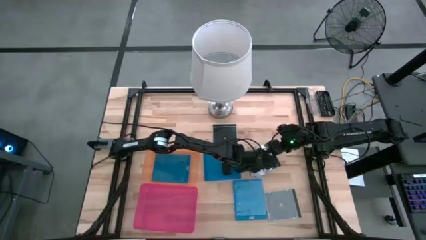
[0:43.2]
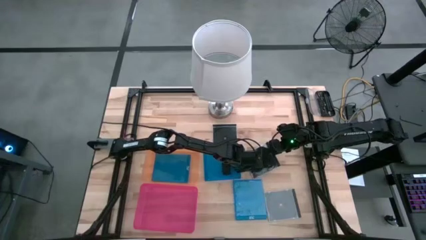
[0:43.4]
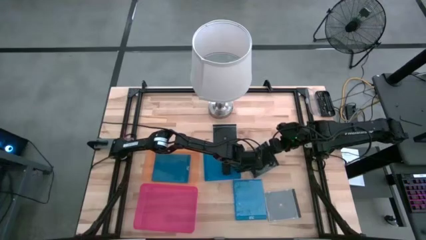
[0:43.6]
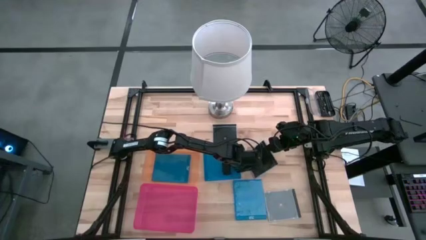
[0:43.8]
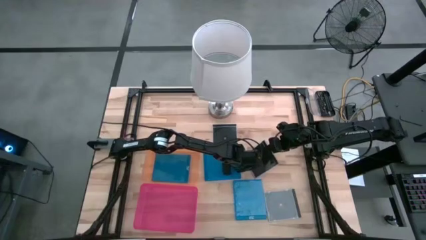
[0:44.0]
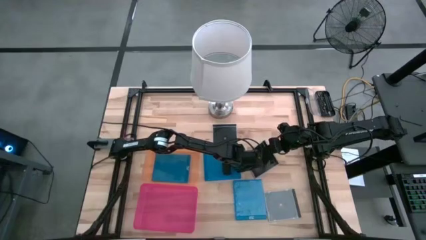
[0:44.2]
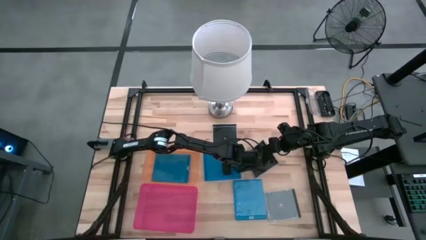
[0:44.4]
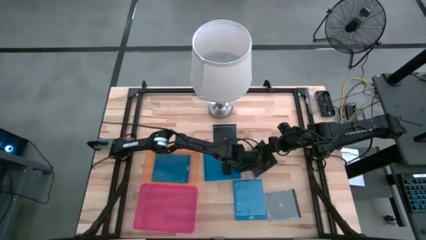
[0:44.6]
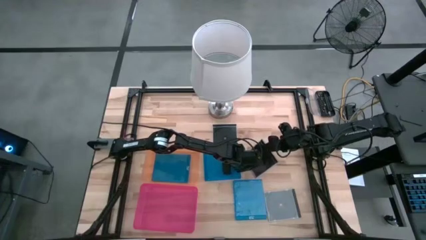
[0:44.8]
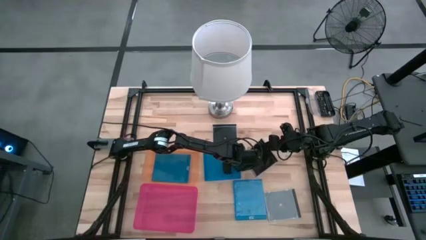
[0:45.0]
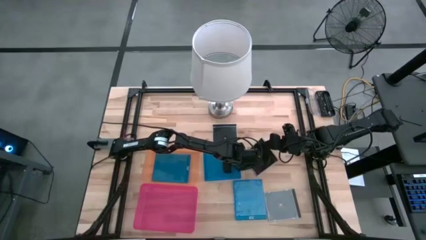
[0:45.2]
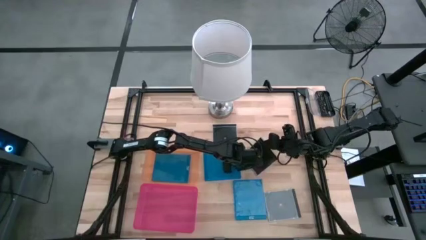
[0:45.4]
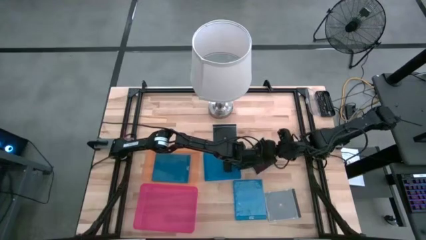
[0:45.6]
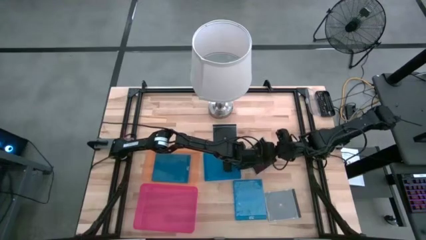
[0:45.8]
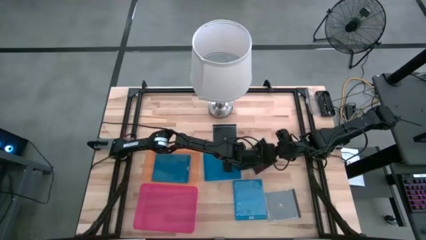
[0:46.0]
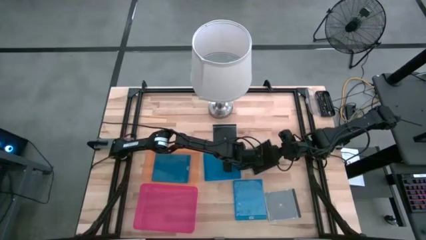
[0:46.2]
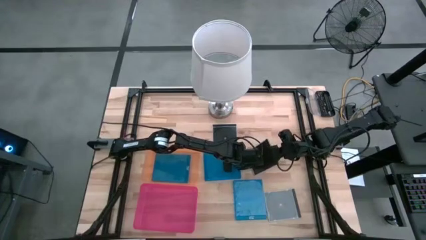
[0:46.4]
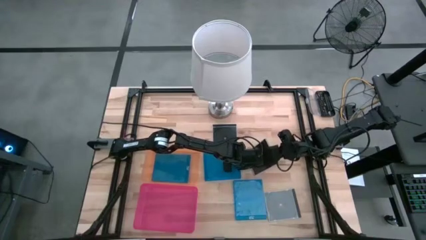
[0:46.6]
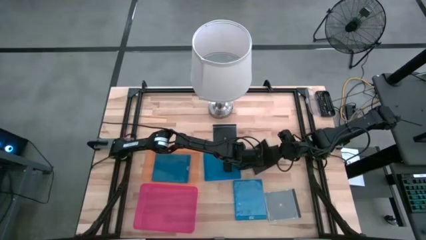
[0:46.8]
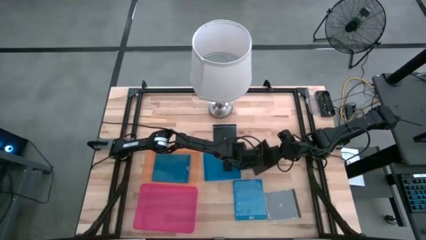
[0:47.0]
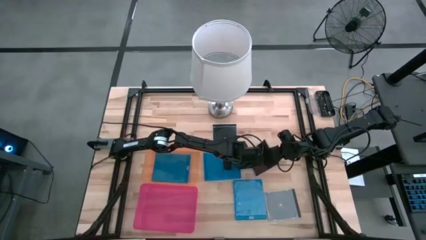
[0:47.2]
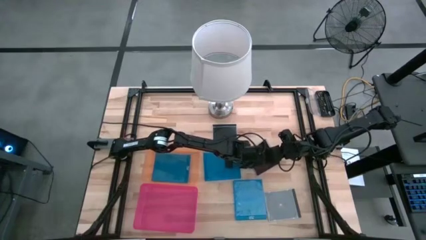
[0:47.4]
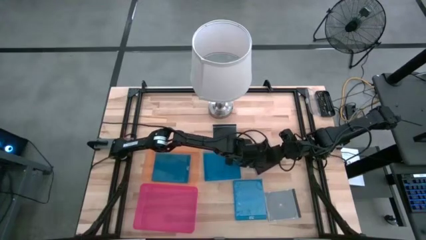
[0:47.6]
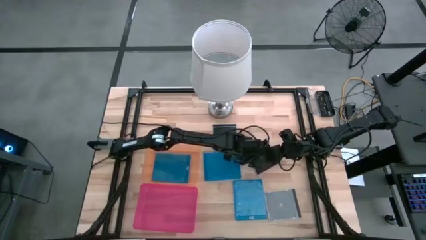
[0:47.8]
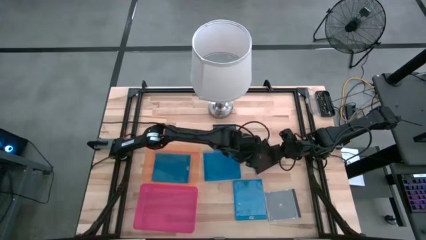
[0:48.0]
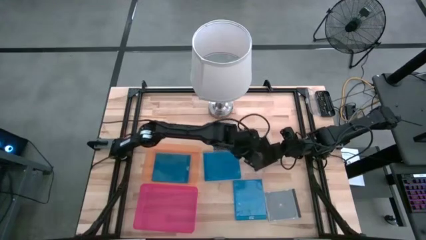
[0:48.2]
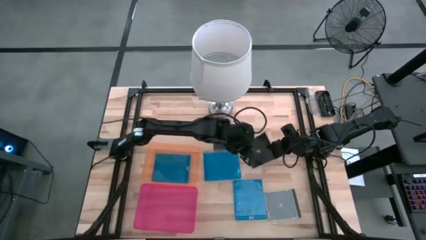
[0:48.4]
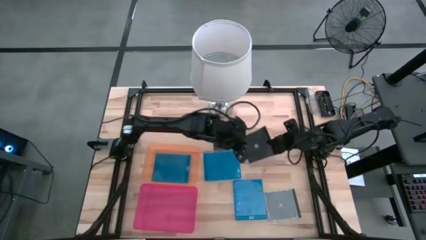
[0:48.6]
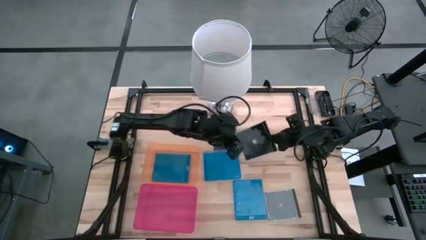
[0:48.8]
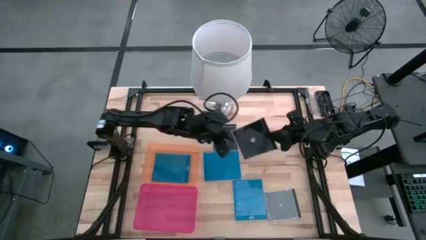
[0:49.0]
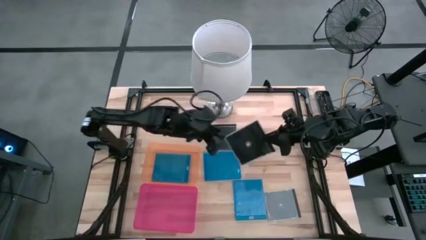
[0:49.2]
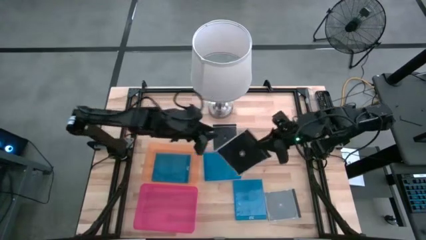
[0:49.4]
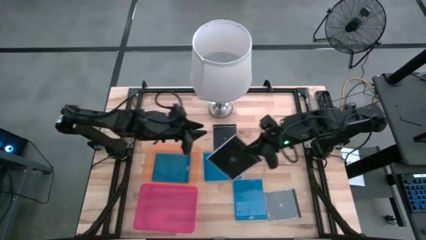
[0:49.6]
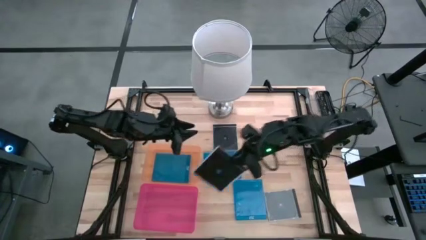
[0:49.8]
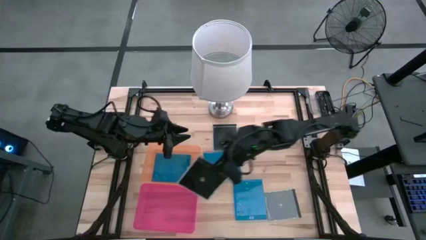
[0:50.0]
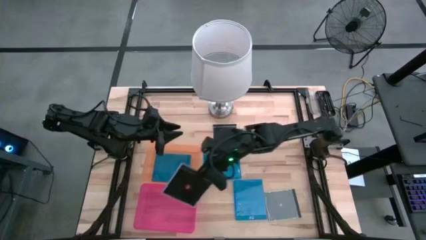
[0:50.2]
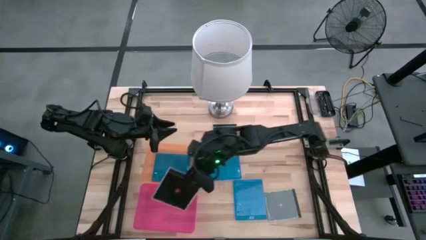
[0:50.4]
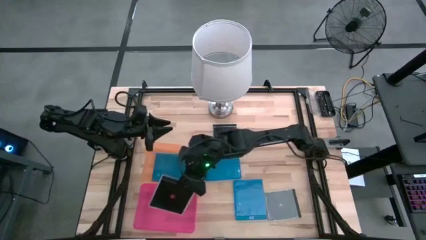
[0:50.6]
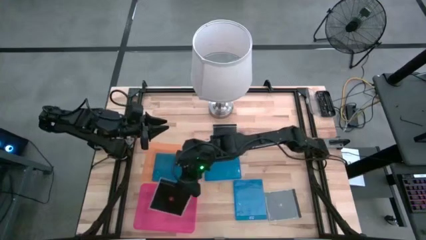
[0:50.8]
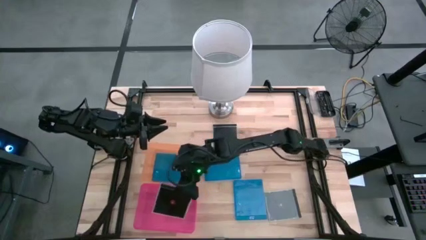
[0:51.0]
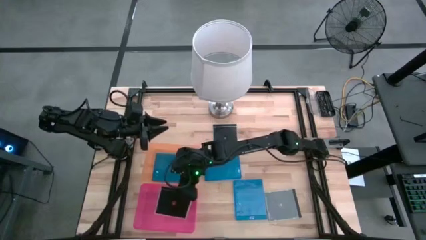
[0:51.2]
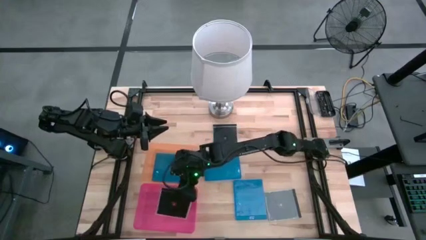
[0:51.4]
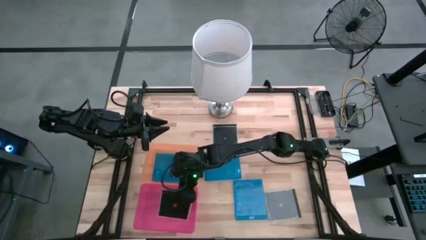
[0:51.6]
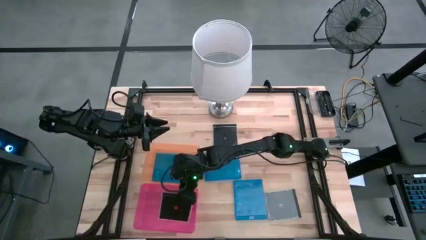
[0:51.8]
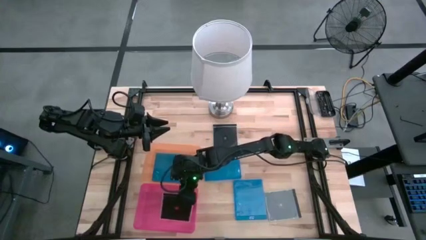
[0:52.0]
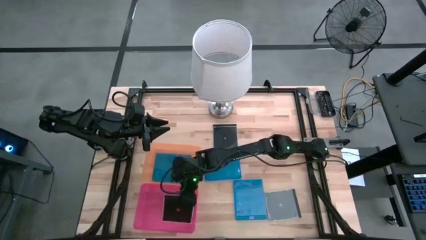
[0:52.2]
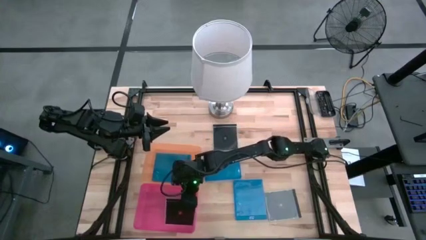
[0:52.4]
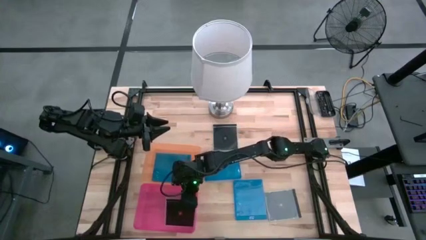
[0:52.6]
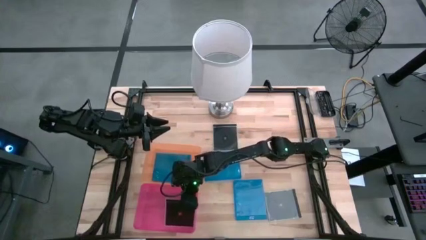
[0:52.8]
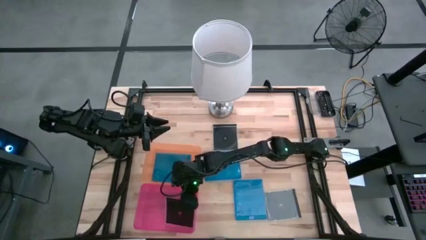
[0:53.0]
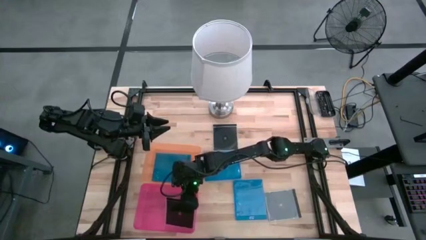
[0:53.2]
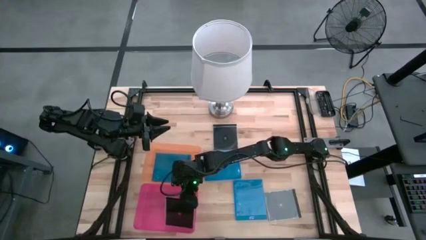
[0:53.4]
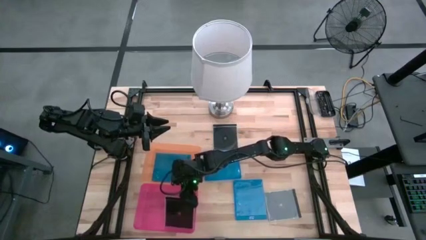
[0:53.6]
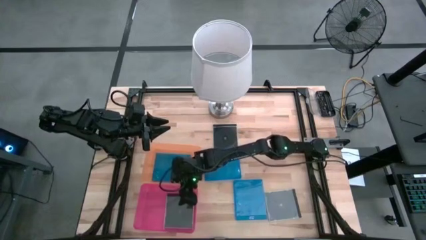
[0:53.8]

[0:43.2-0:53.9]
Task: Pick & place jewel cases by type
Put the middle right black CD case into the pink bin
